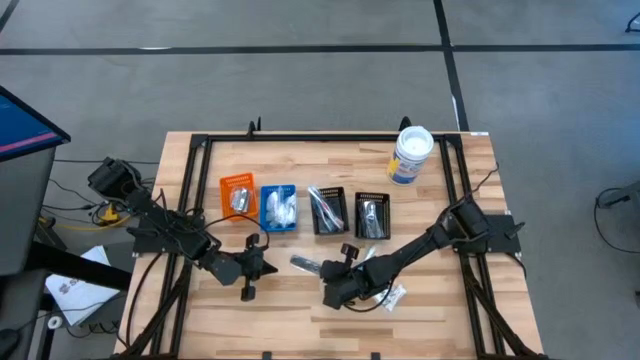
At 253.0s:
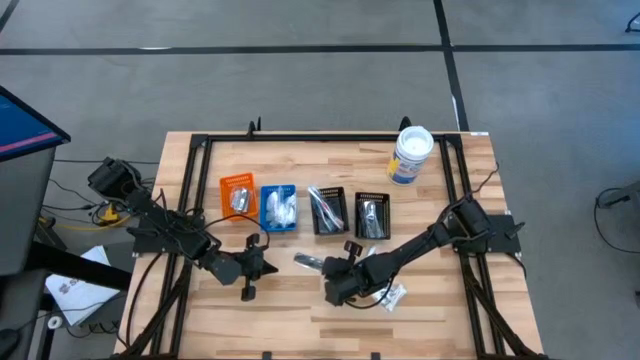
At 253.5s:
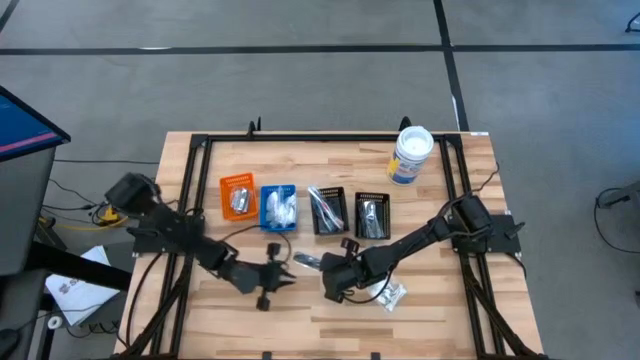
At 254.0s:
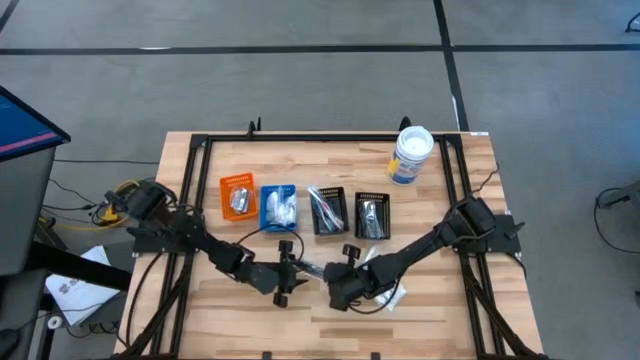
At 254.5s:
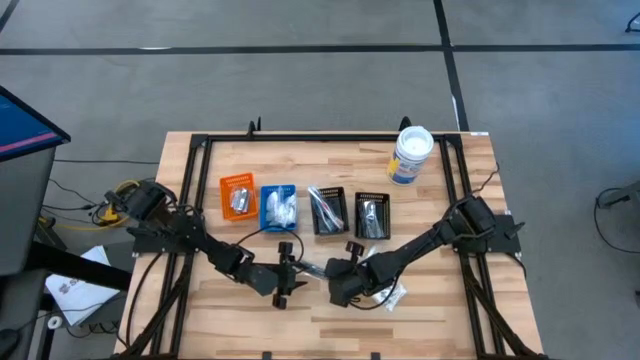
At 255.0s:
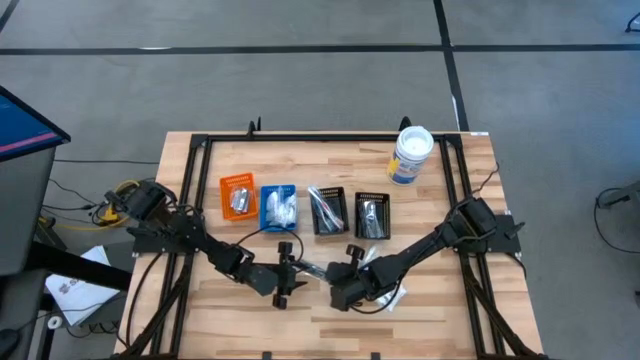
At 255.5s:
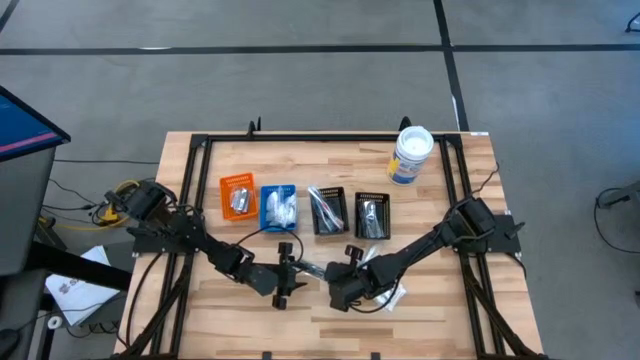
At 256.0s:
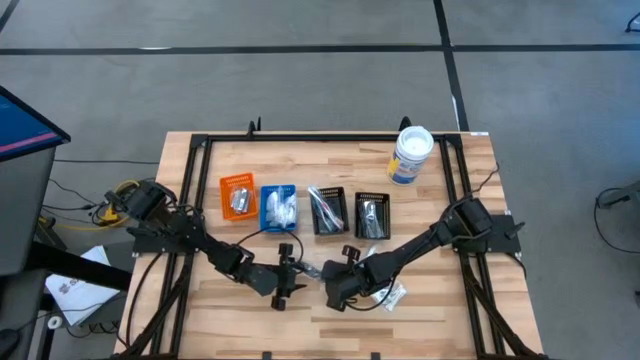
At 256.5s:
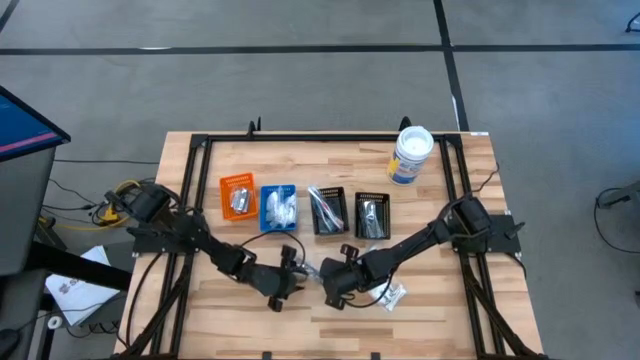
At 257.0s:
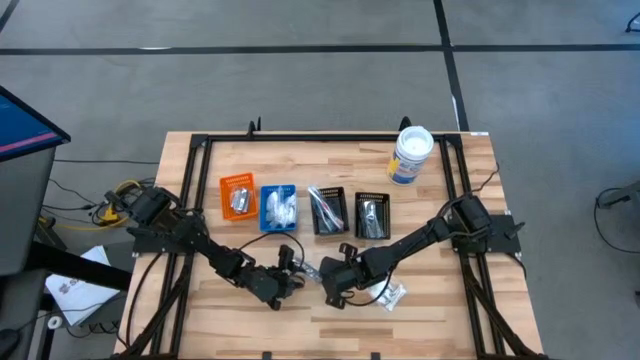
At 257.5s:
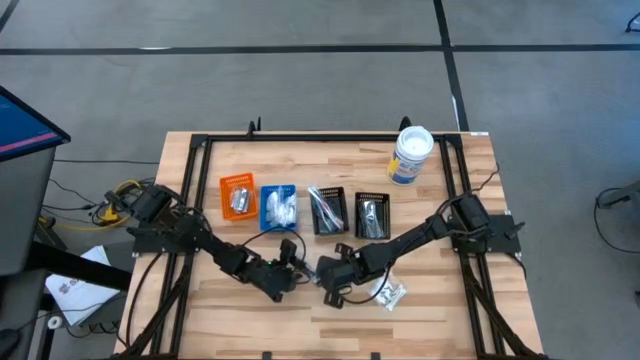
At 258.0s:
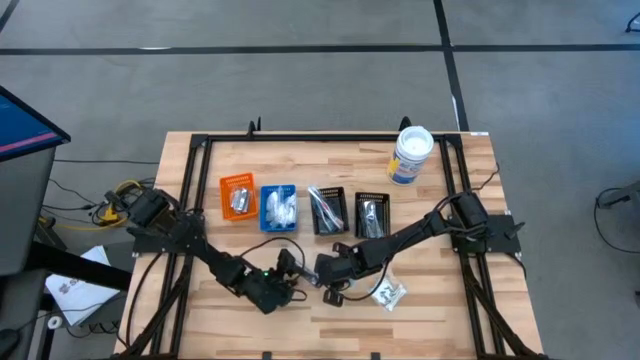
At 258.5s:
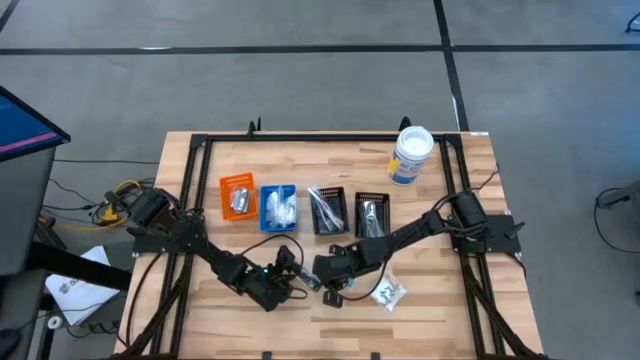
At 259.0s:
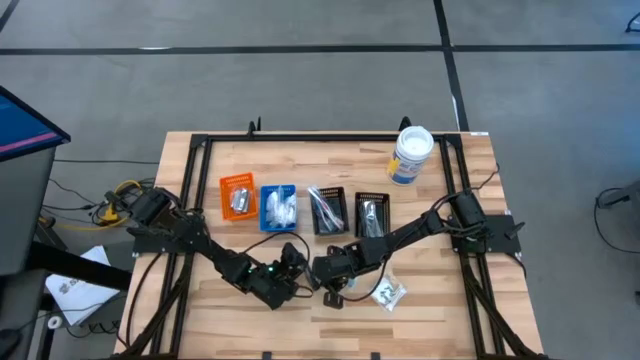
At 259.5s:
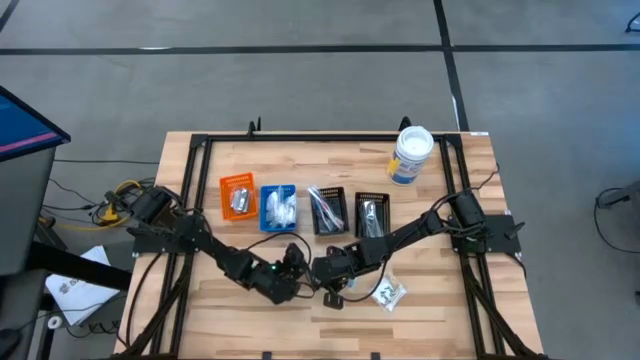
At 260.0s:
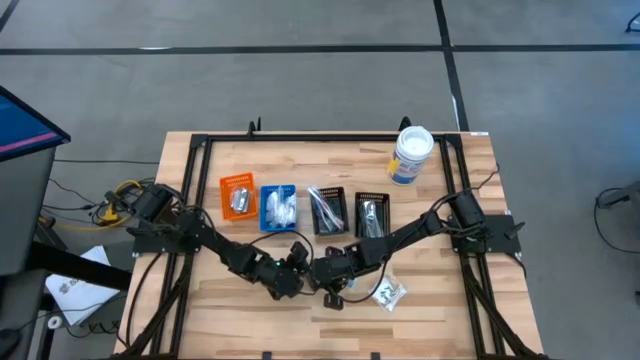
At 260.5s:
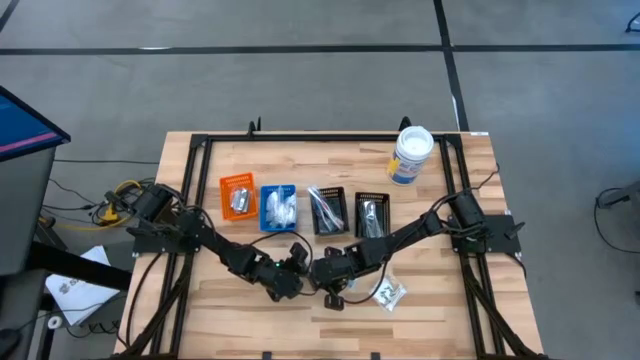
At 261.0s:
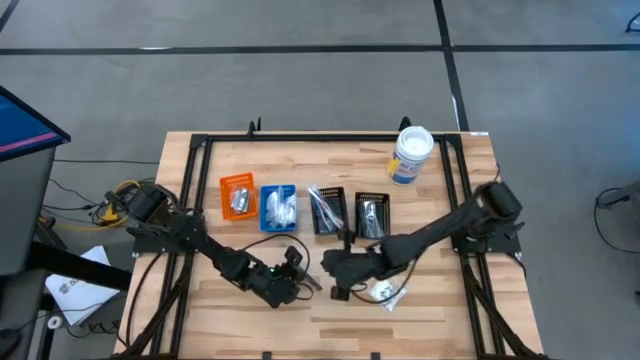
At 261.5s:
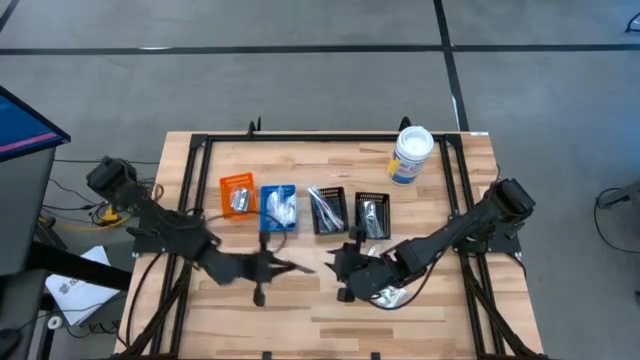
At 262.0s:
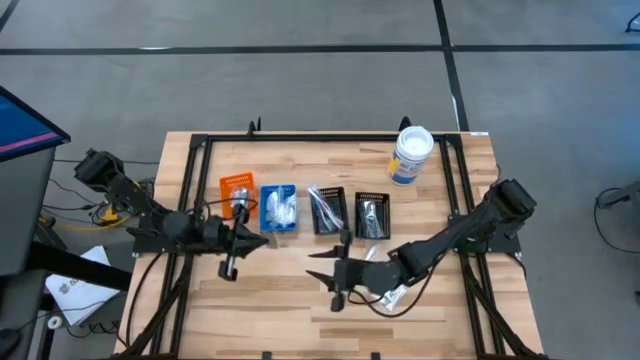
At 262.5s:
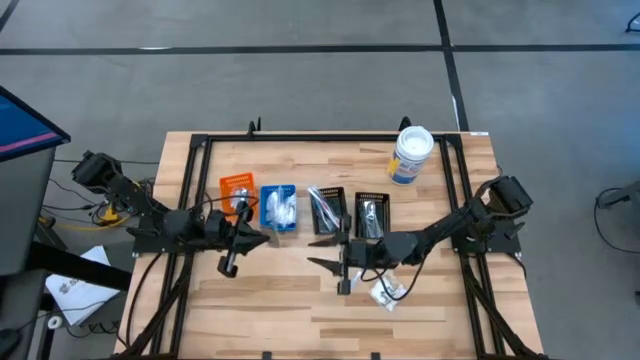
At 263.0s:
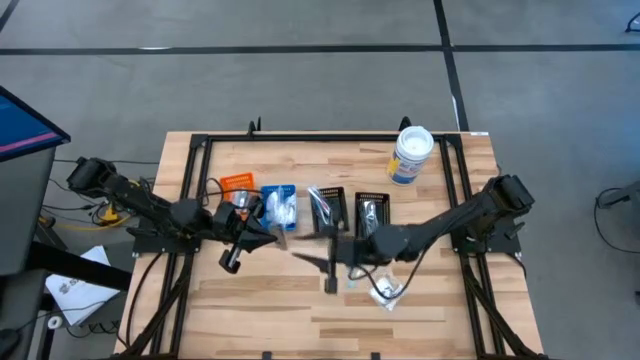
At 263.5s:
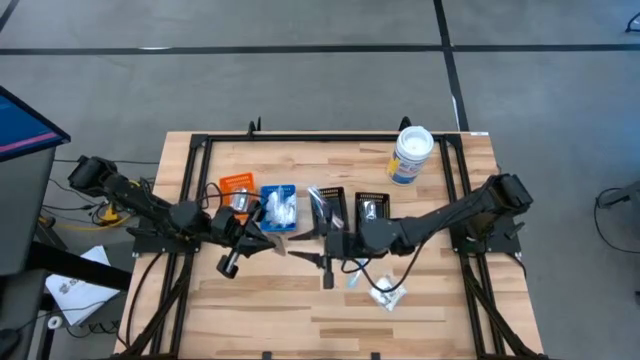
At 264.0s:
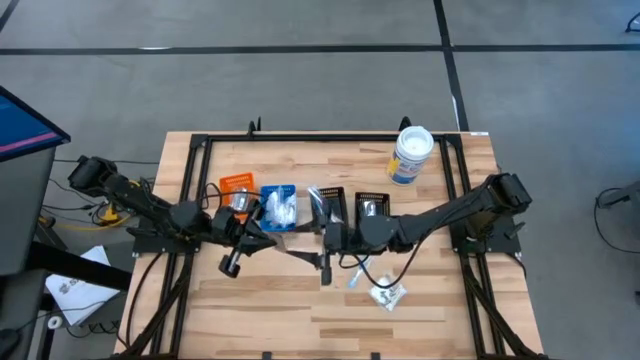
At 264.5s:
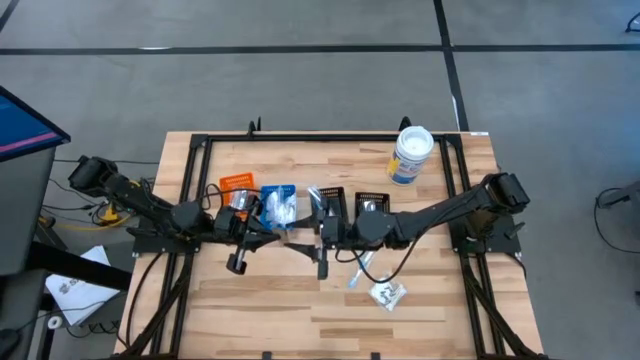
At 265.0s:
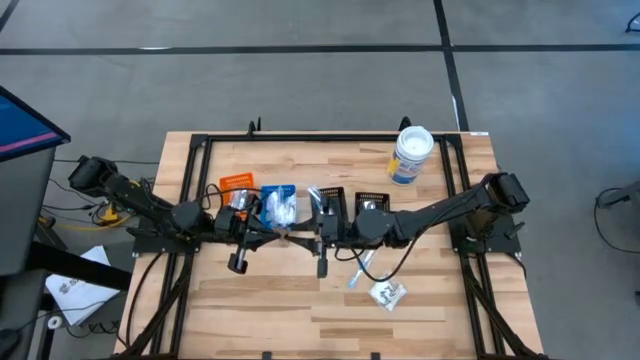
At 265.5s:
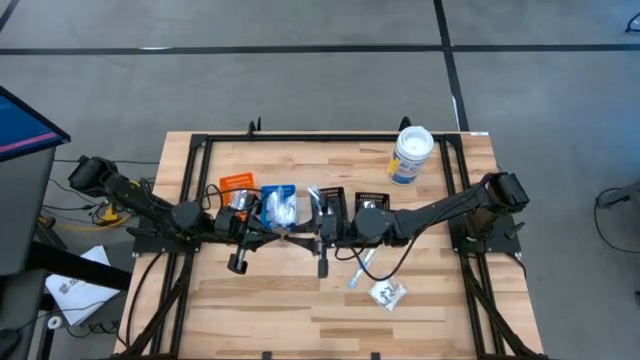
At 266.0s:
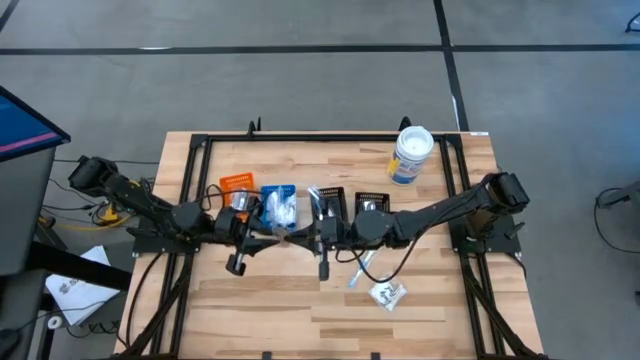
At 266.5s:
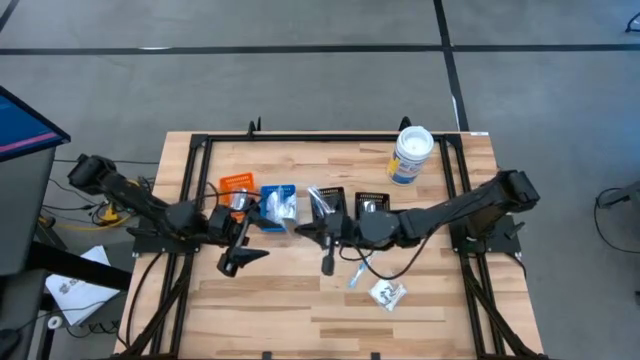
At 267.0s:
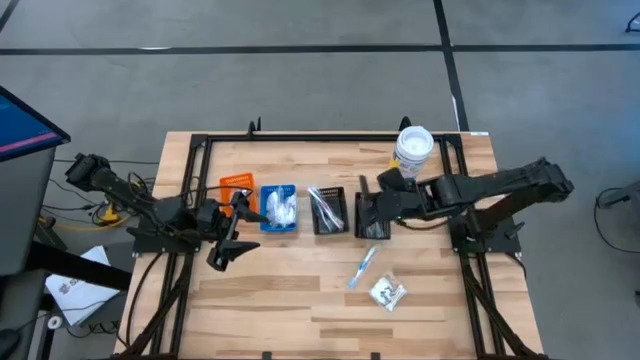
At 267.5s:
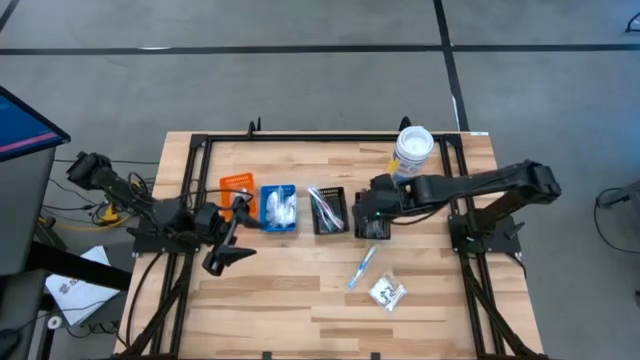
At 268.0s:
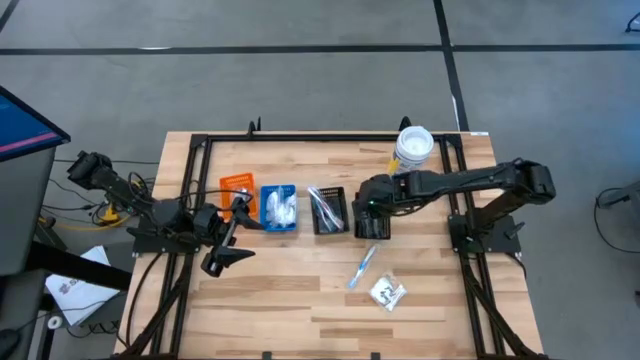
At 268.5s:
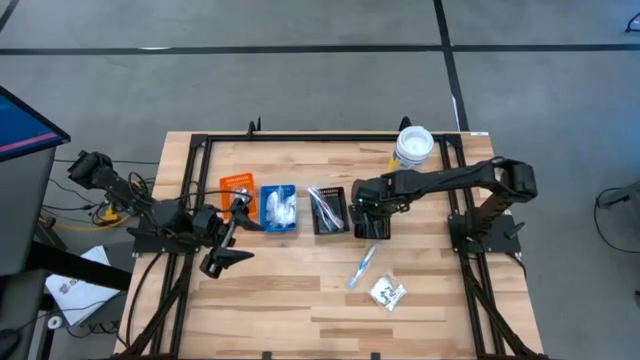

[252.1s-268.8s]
Task: Pick & Place Travel size toiletries
Put the black comb into the right black bin

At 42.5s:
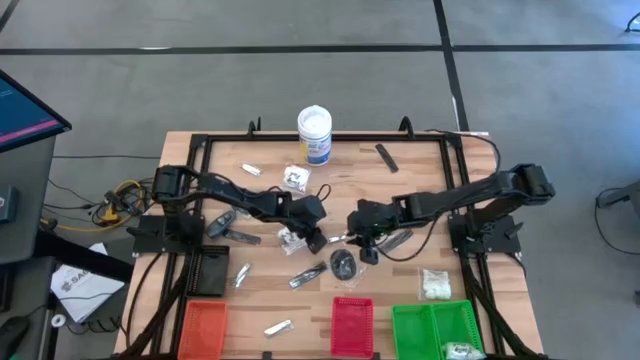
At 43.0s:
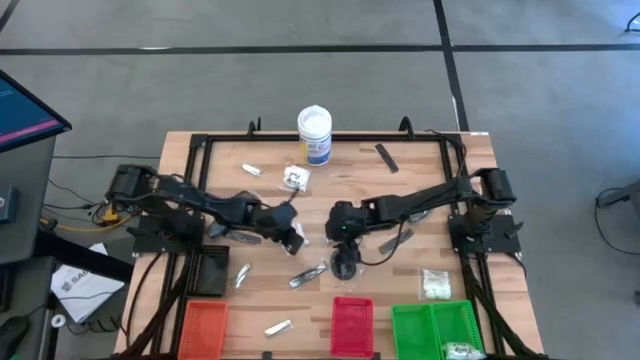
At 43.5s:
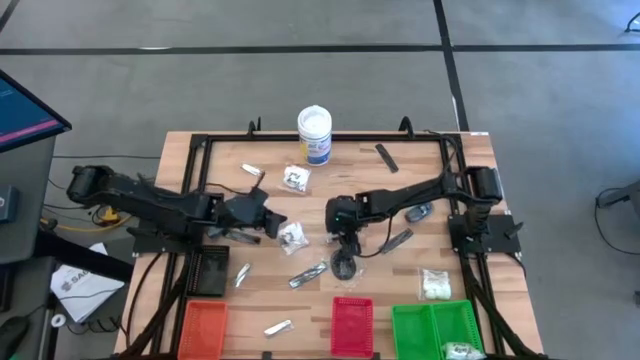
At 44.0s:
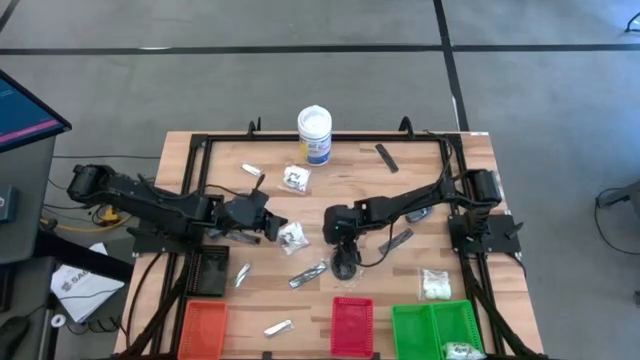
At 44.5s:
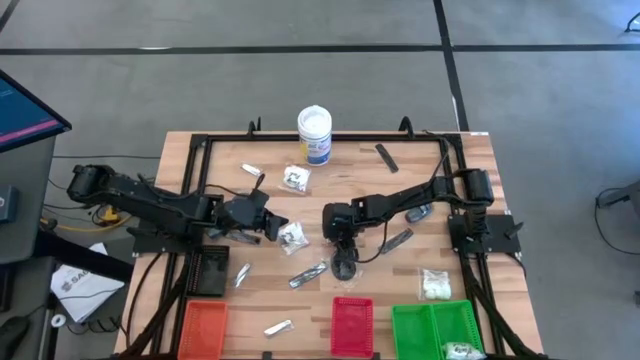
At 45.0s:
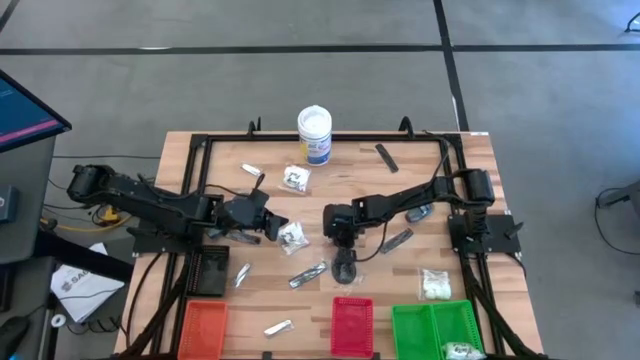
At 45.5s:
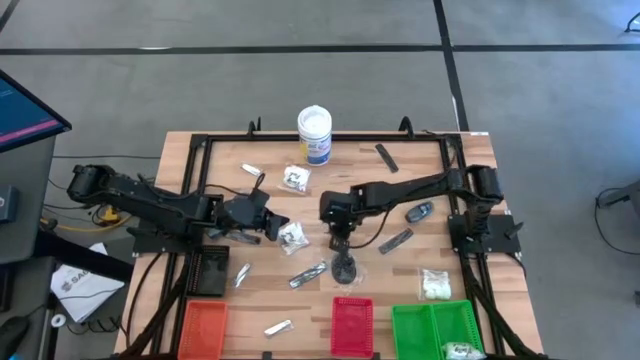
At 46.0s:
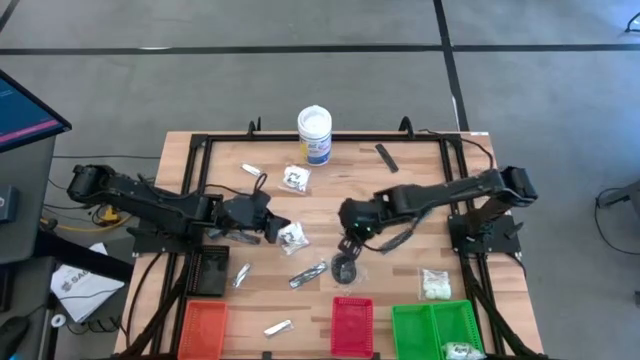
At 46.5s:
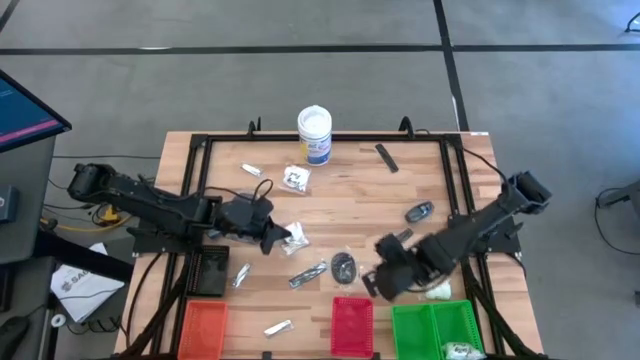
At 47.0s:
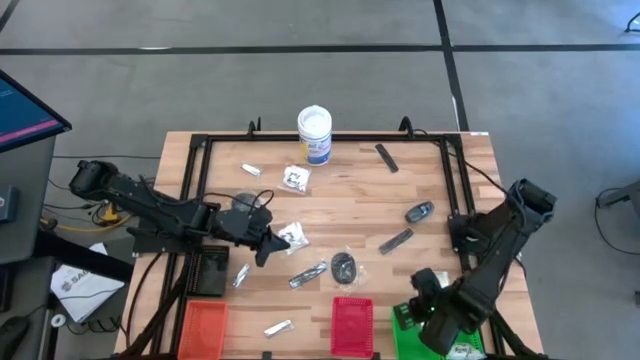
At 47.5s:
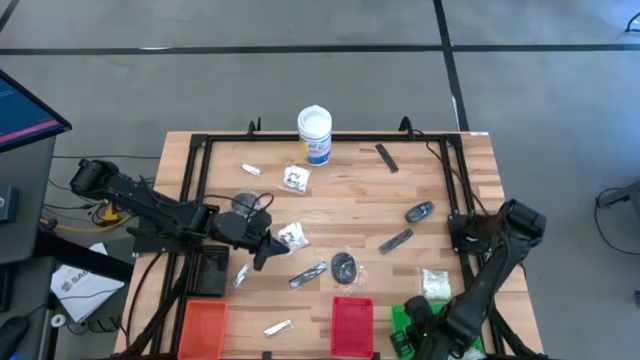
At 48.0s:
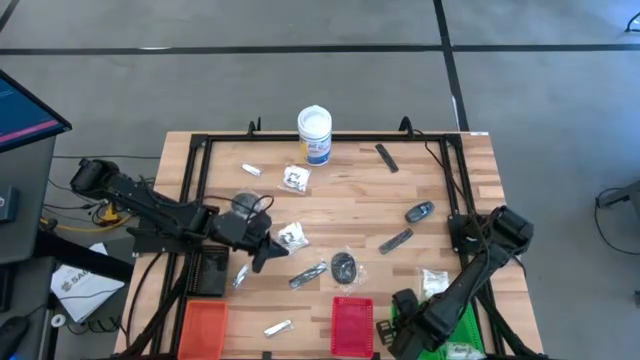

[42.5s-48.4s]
Task: Pick & Place Travel size toiletries
Put the silver nail cutter into the left green bin
